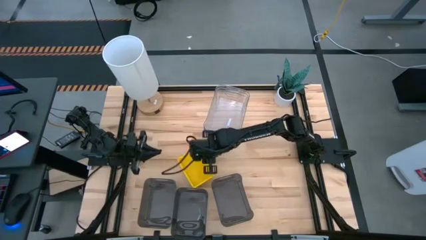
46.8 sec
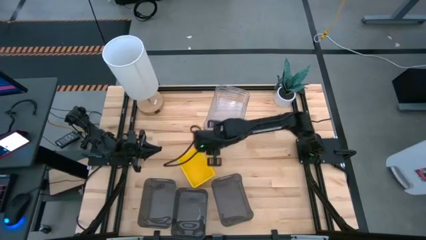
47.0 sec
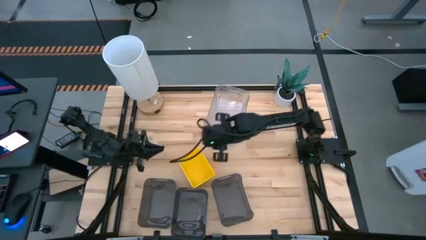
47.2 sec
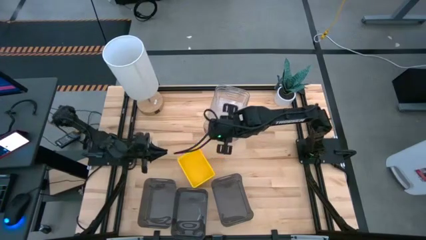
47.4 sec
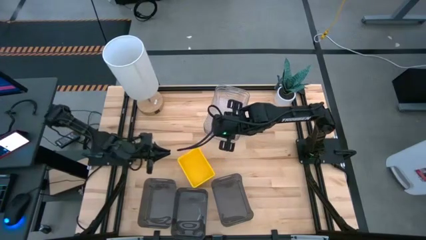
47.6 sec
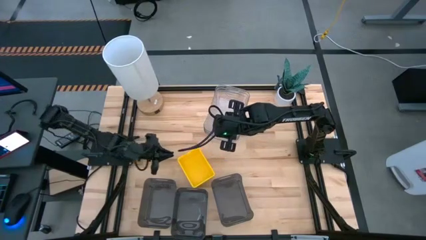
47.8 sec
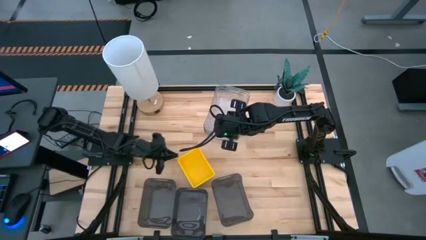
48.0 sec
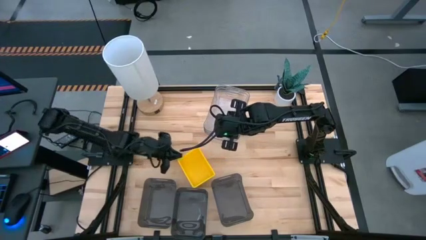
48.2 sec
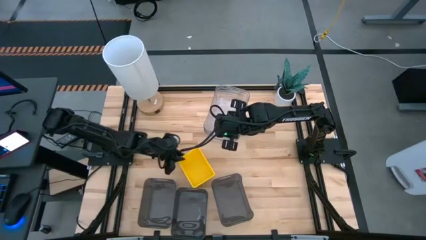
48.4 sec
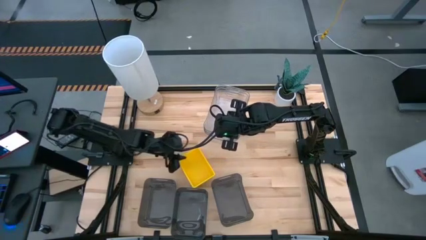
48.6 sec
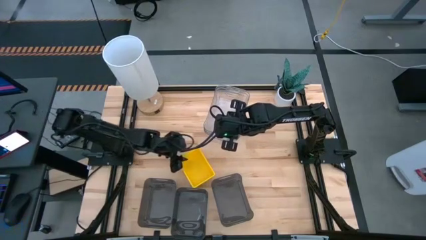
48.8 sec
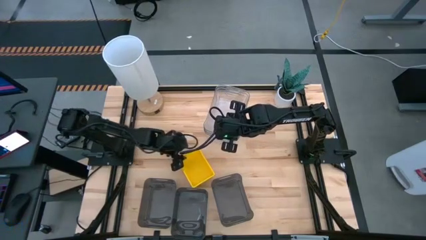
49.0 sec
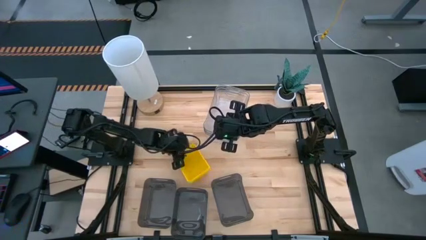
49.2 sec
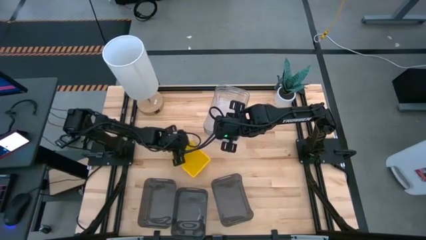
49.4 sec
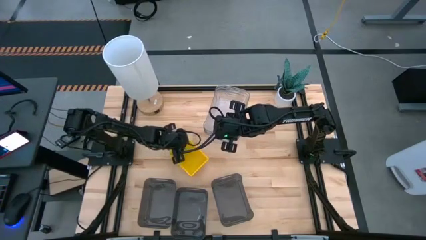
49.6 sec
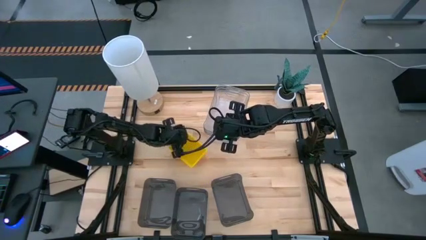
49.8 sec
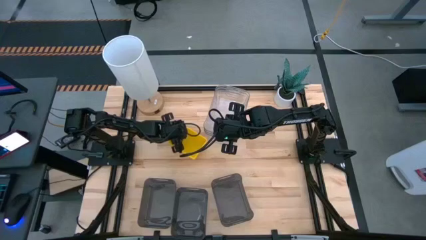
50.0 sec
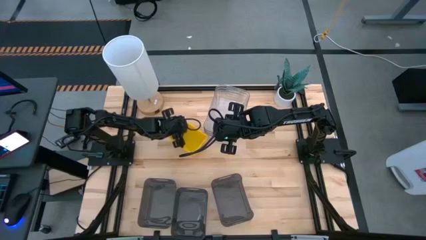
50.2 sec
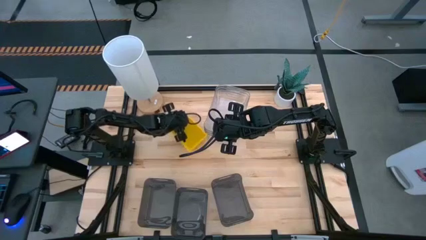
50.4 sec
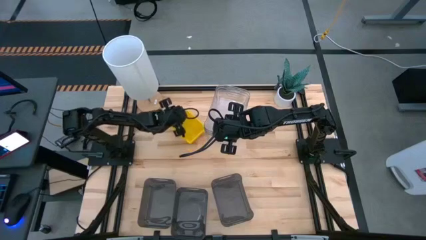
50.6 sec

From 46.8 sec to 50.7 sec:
Move the stacked yellow bins to the top left of the table

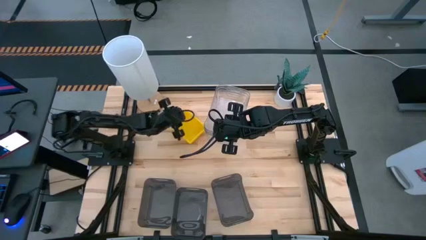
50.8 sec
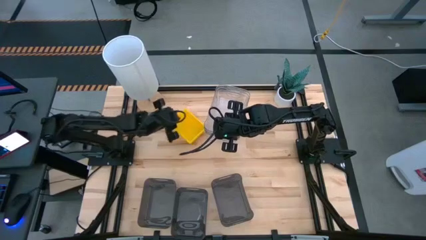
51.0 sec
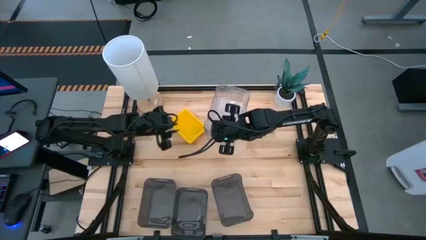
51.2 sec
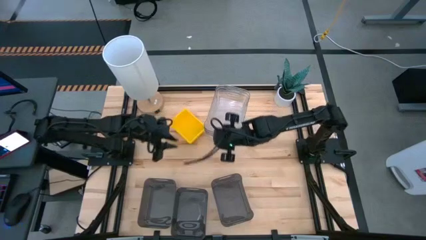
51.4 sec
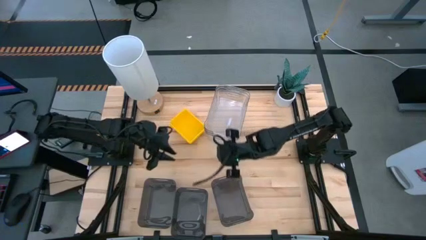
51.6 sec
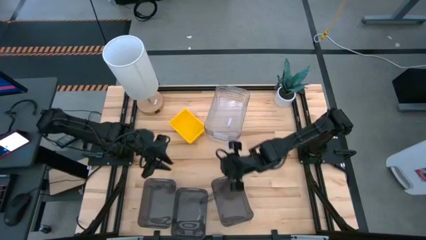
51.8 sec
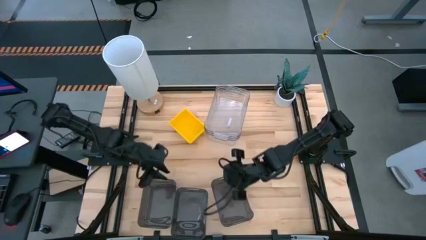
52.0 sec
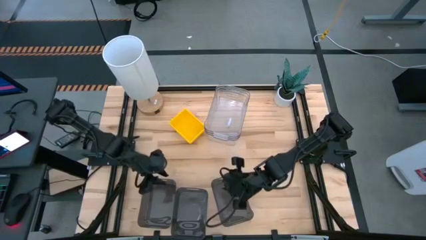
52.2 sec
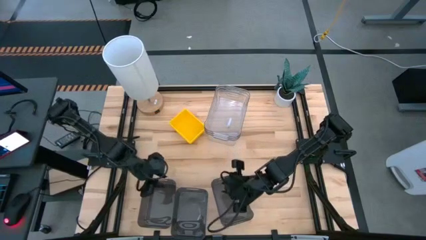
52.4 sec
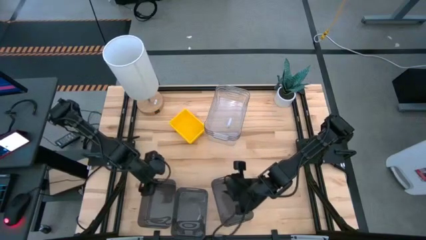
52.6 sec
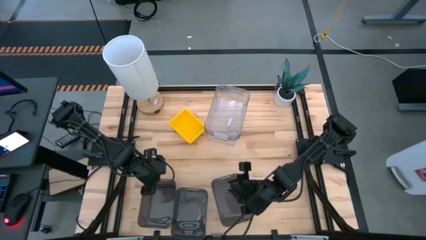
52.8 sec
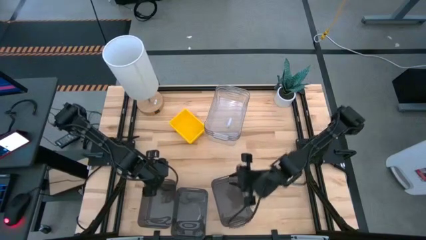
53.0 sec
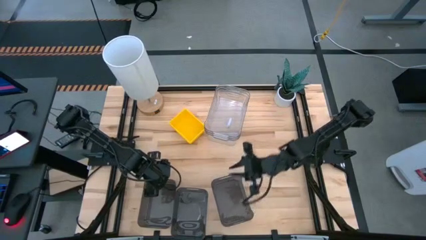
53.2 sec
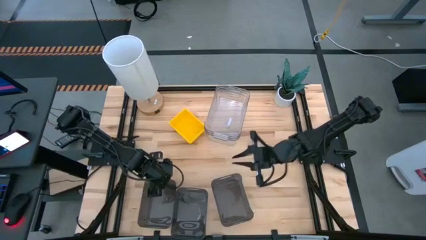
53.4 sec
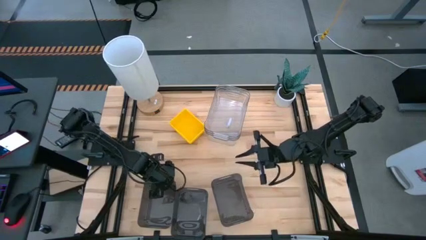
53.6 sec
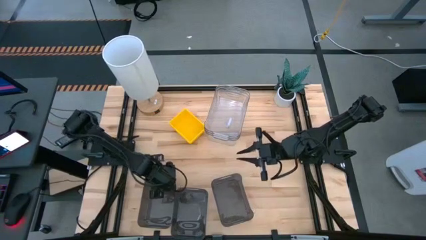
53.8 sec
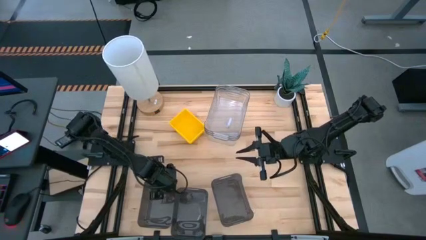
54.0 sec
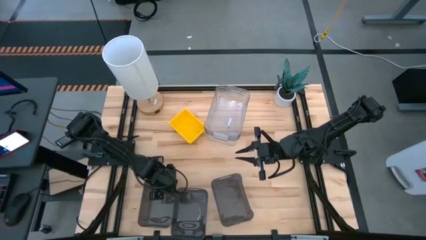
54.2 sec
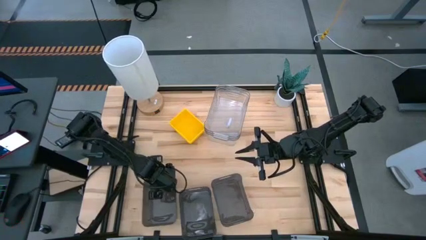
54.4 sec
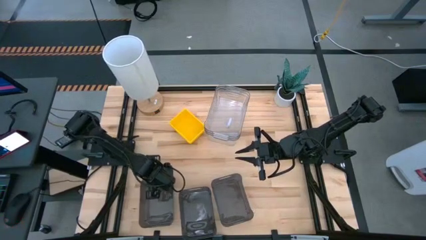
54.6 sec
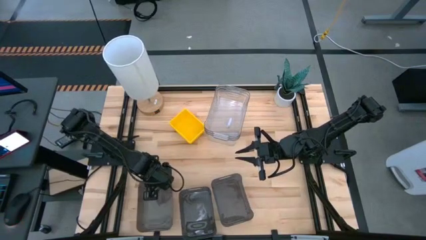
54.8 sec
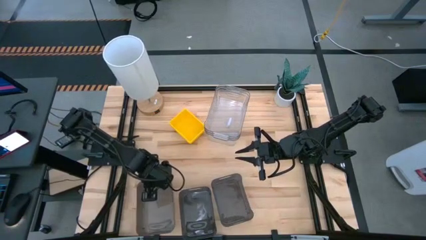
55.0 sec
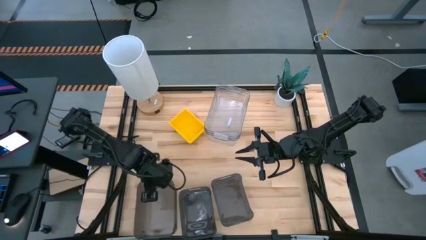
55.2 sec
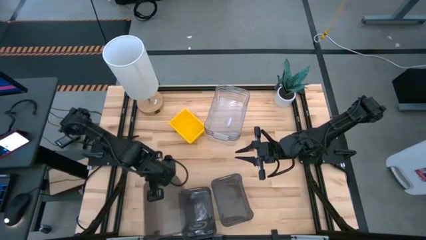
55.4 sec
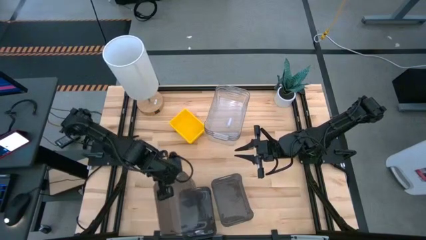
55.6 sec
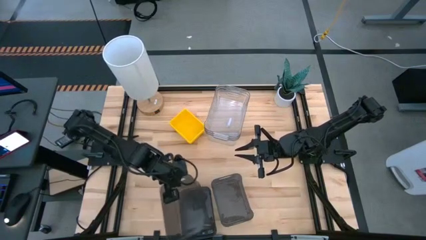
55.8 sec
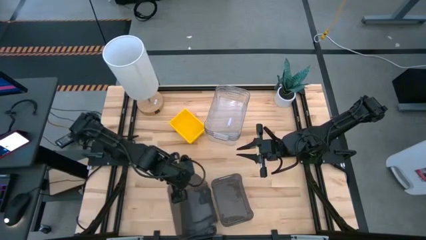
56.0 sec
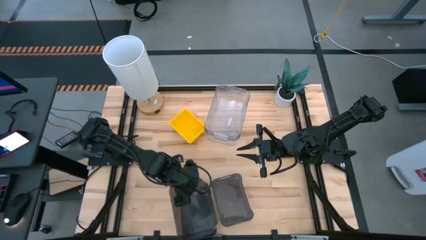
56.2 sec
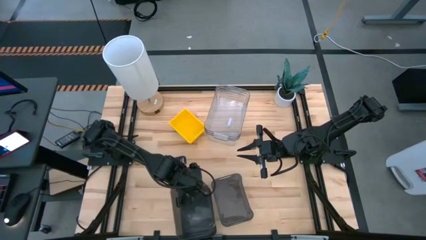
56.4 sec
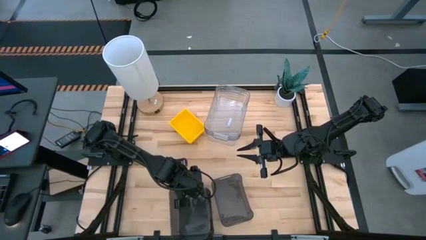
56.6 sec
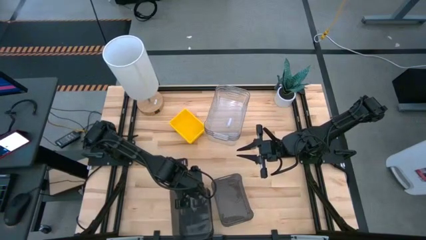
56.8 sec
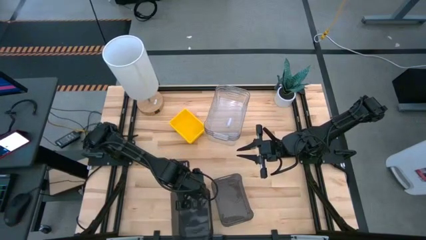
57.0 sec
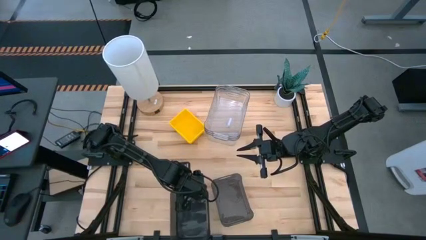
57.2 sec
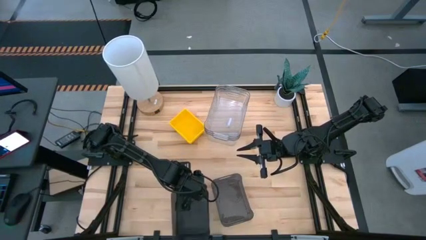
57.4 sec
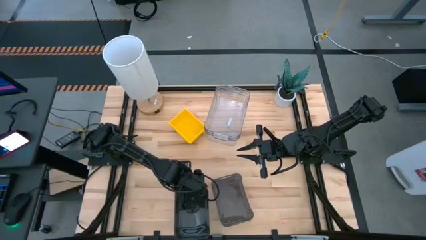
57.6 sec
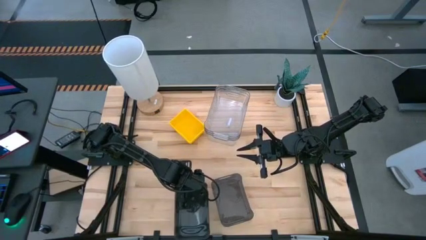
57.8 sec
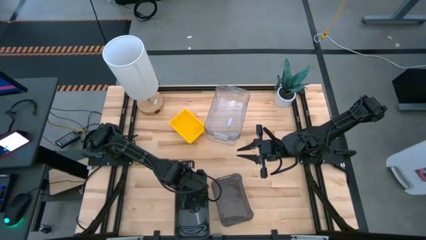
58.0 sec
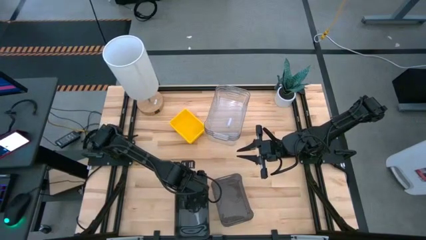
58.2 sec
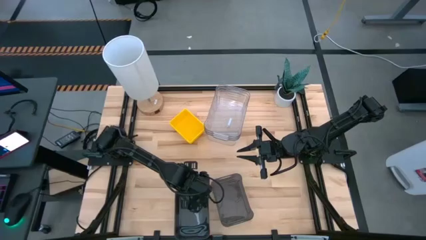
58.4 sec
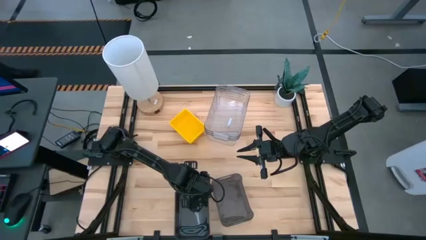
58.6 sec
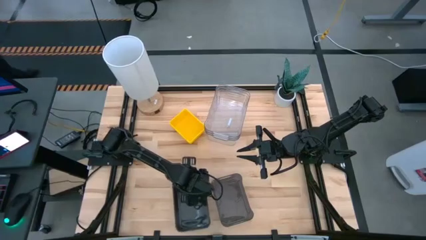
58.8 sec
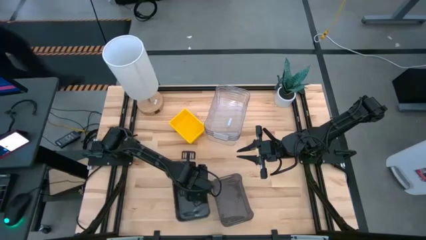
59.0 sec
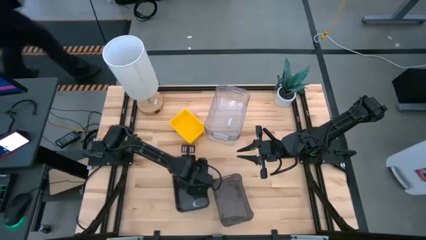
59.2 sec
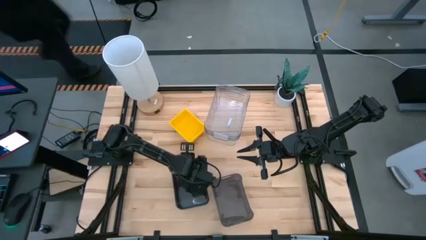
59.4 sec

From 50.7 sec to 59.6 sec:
Stack the left black bin on top of the middle black bin
